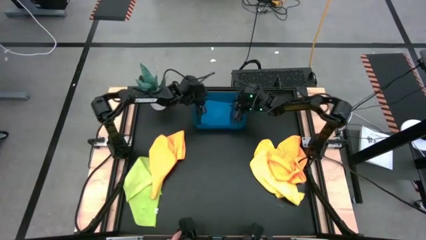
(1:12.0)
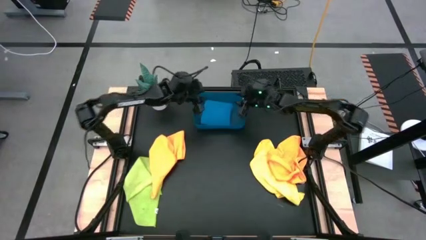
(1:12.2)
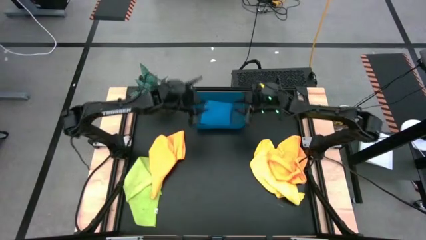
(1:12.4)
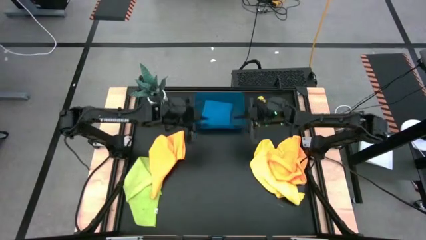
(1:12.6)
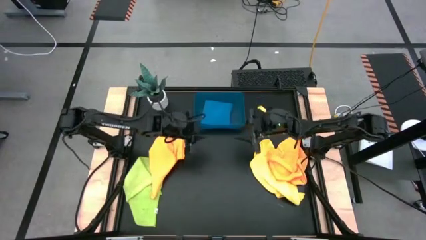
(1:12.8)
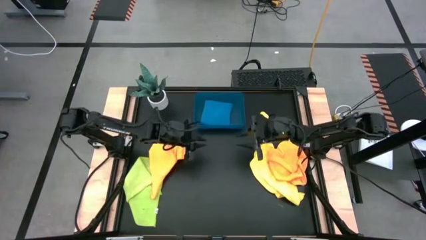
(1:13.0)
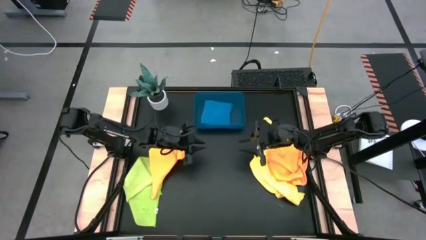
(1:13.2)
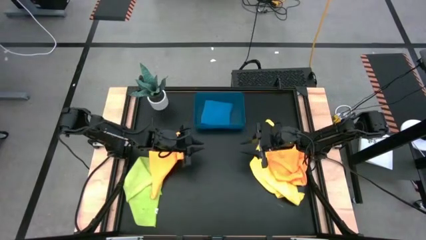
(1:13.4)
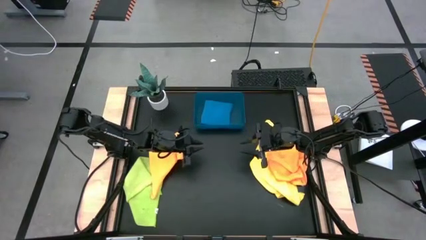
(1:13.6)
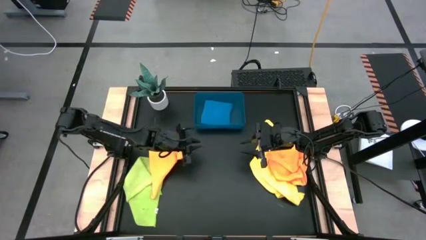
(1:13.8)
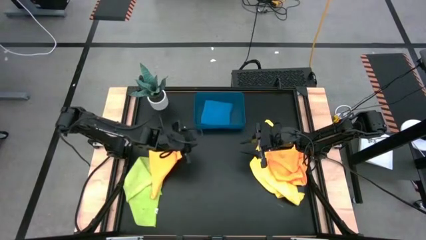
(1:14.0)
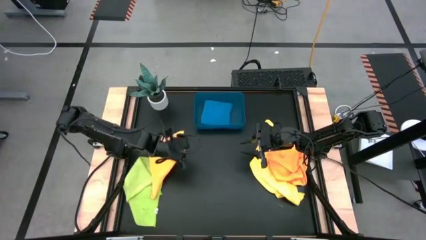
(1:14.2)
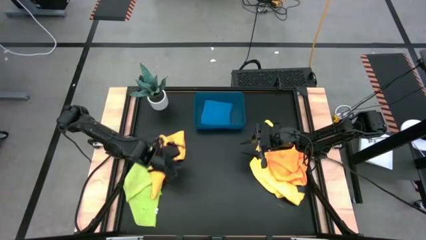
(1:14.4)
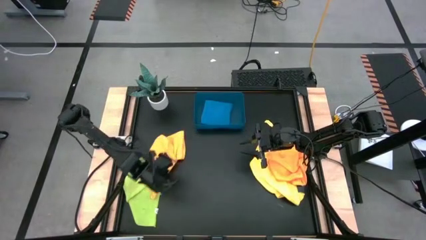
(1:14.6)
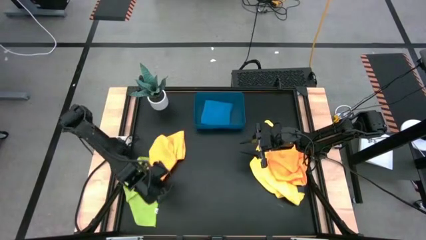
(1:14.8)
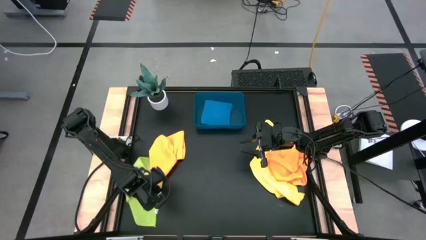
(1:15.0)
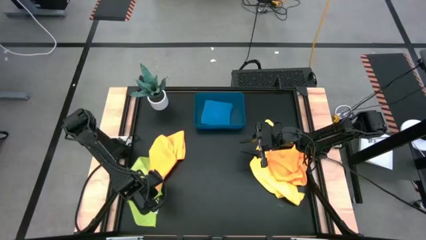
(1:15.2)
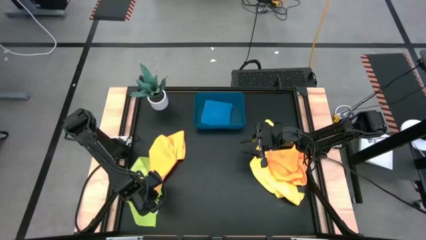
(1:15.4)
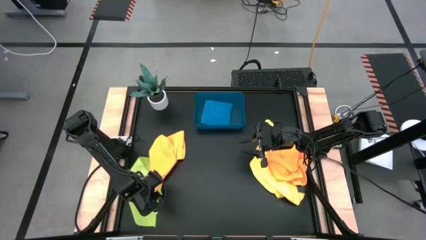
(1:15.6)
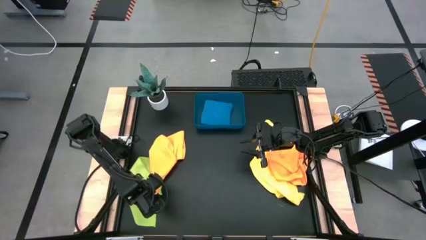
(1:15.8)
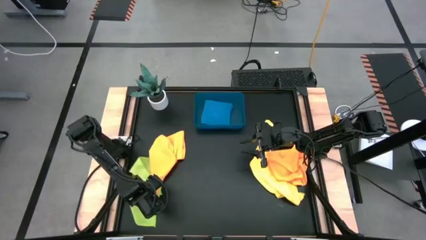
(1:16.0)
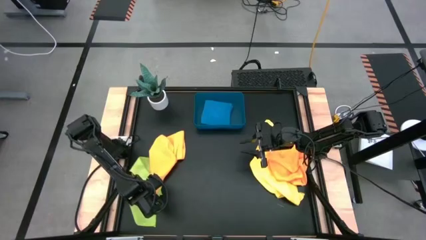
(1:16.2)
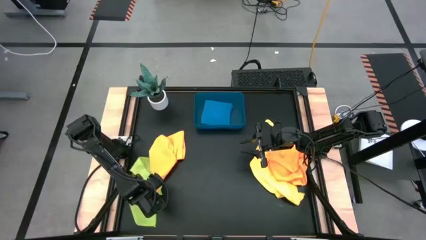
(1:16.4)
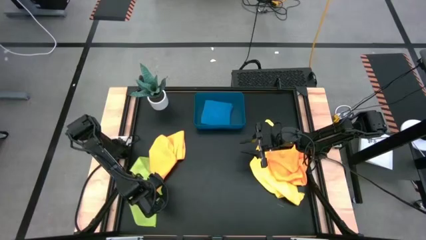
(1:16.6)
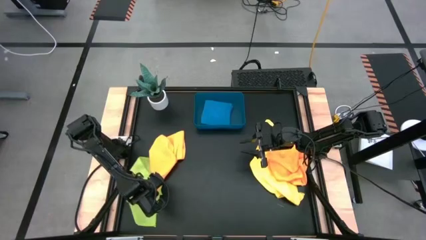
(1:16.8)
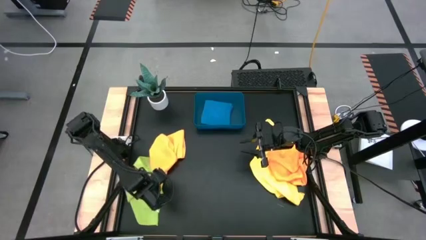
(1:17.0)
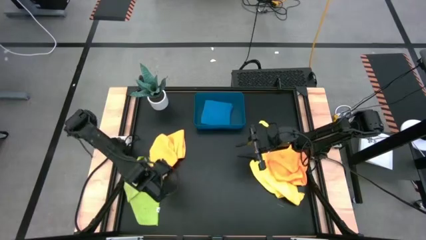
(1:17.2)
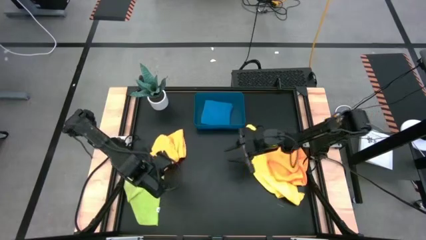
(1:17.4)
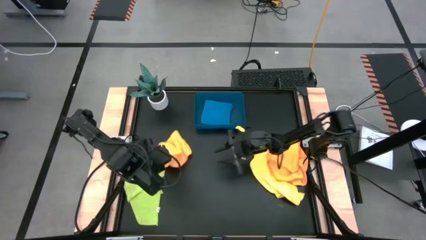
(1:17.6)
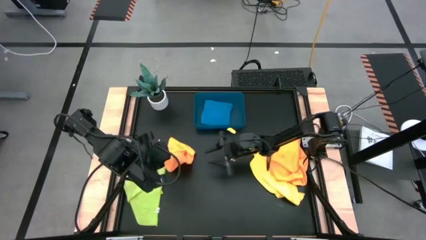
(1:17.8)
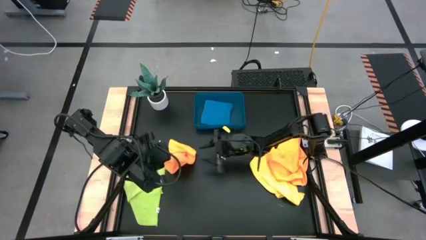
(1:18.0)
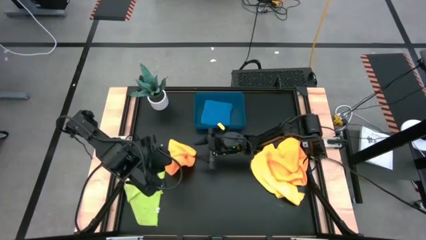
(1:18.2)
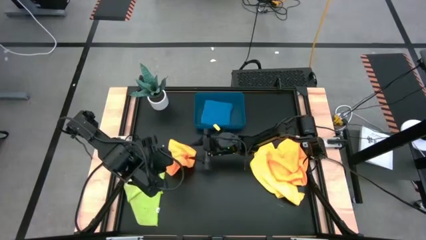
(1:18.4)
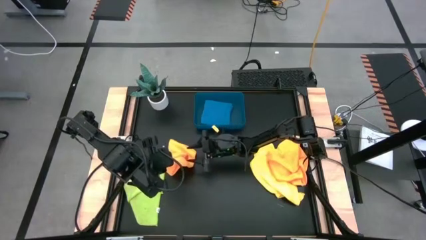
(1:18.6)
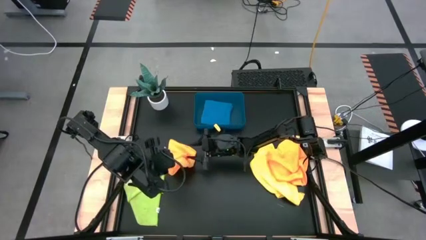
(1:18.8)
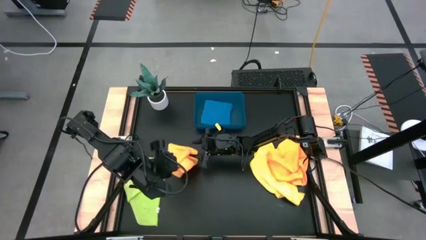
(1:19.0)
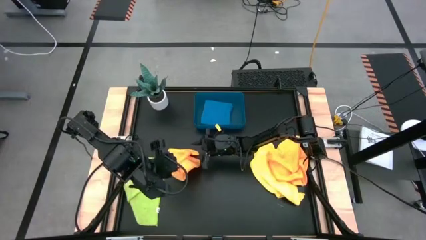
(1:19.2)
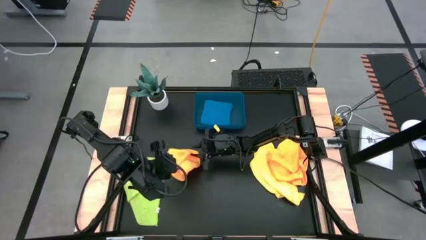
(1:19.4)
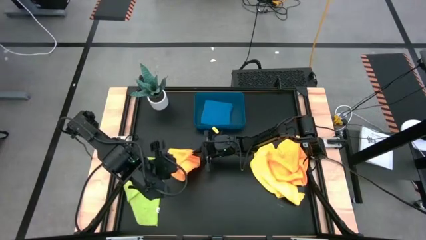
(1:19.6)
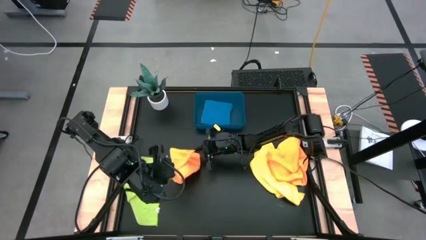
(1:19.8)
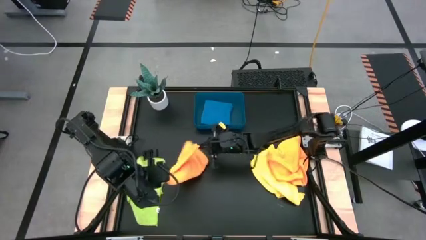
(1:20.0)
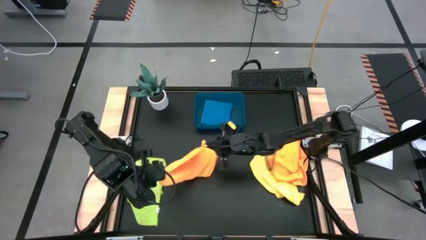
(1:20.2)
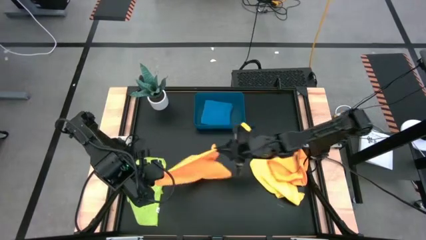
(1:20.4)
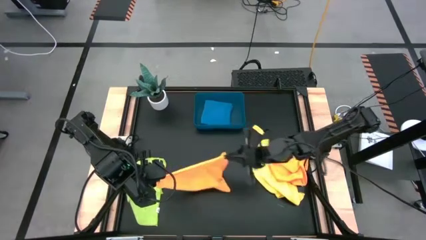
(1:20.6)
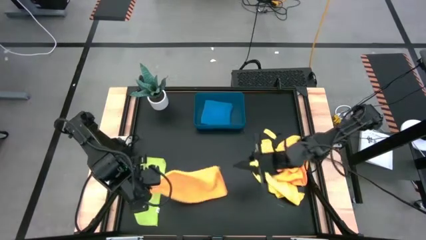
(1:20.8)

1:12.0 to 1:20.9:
Task: Fold microfiber towels
Fold the left orange microfiber cloth
